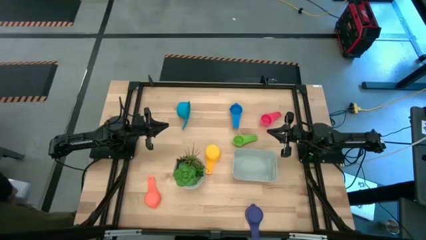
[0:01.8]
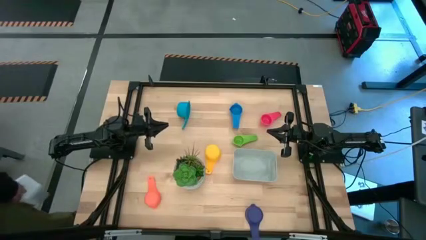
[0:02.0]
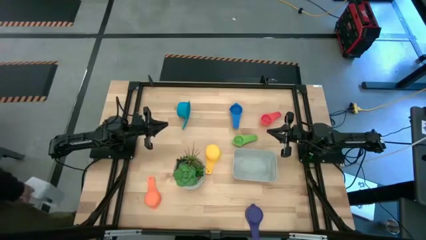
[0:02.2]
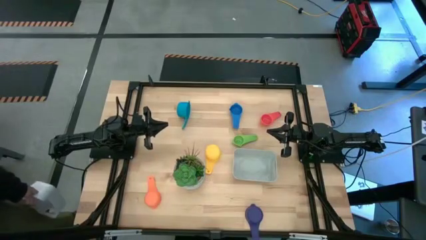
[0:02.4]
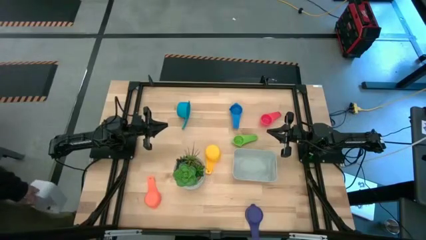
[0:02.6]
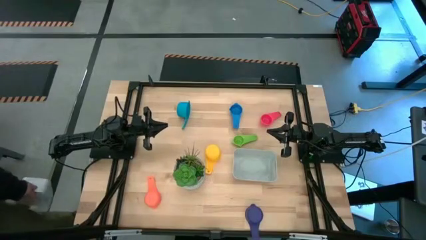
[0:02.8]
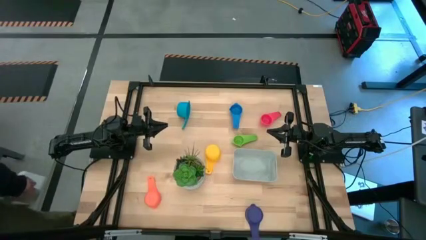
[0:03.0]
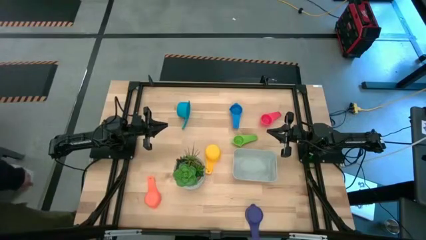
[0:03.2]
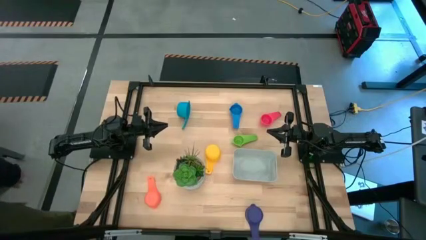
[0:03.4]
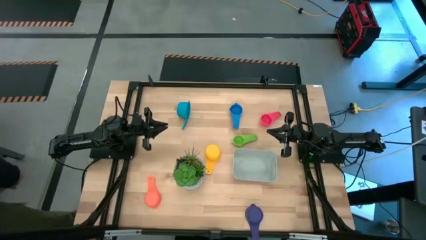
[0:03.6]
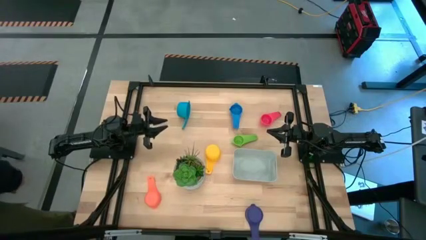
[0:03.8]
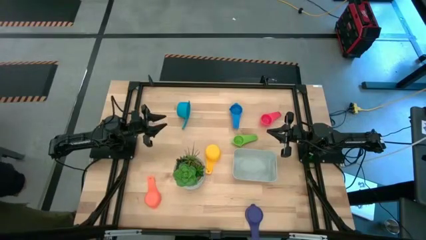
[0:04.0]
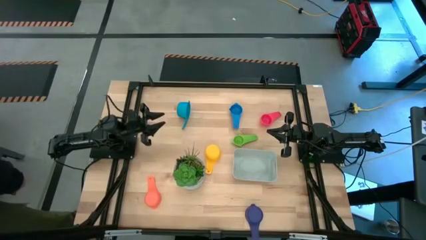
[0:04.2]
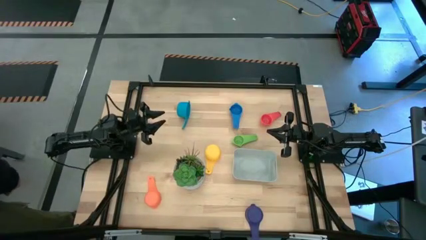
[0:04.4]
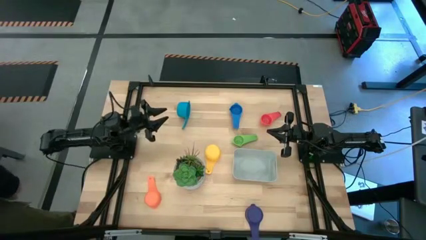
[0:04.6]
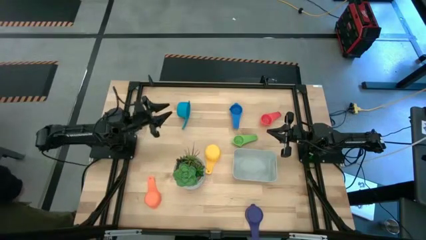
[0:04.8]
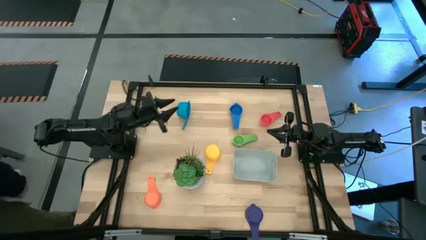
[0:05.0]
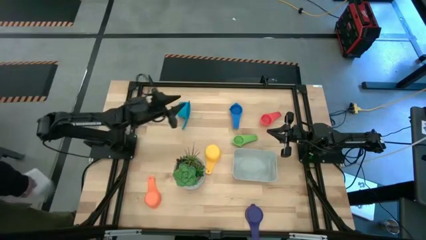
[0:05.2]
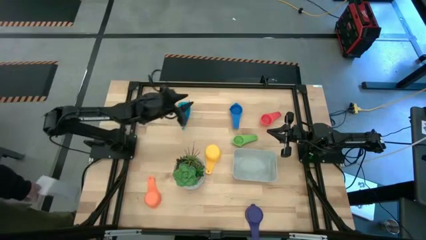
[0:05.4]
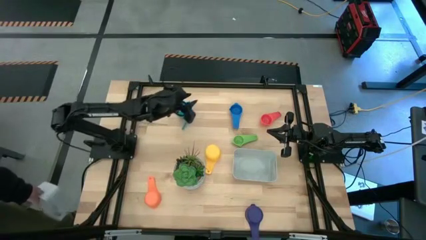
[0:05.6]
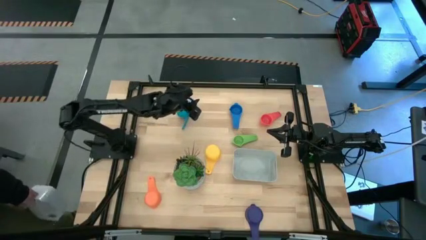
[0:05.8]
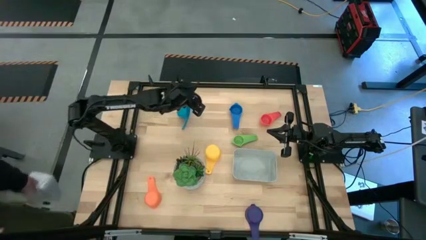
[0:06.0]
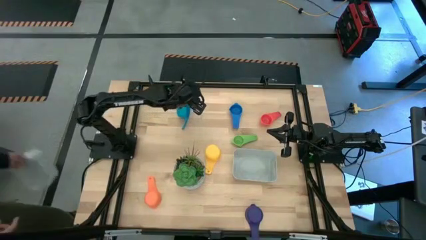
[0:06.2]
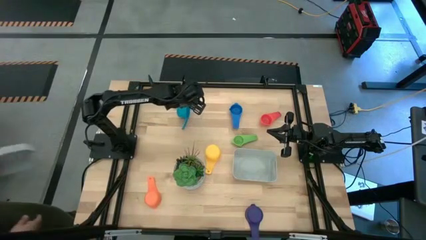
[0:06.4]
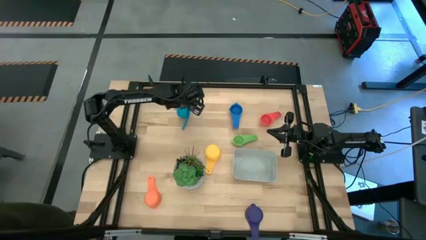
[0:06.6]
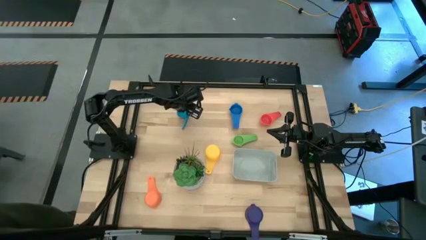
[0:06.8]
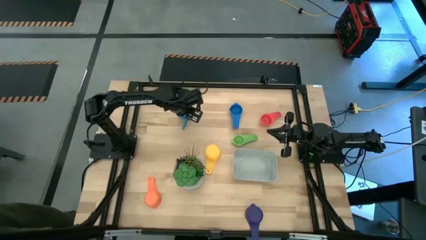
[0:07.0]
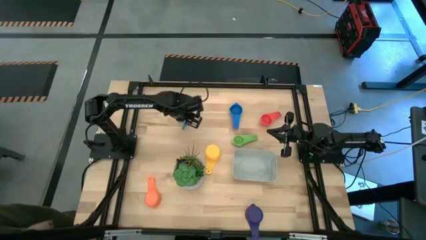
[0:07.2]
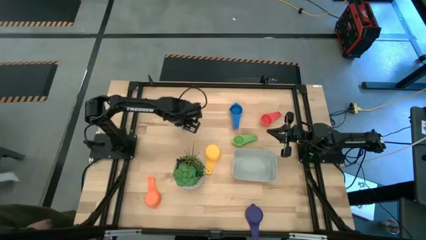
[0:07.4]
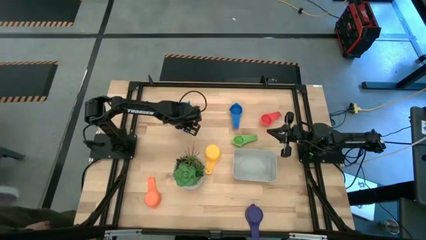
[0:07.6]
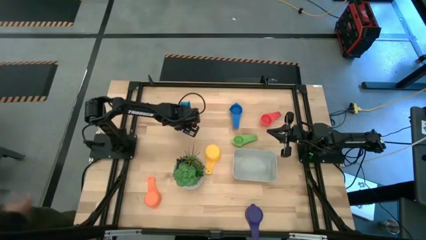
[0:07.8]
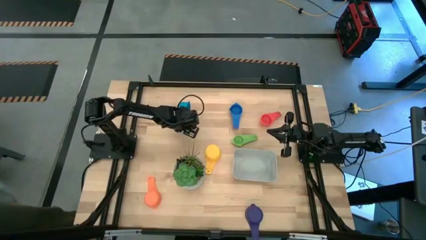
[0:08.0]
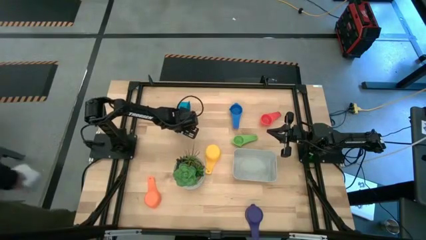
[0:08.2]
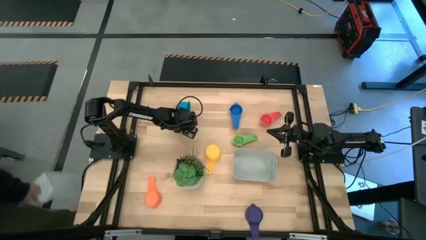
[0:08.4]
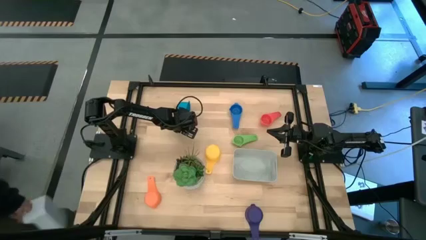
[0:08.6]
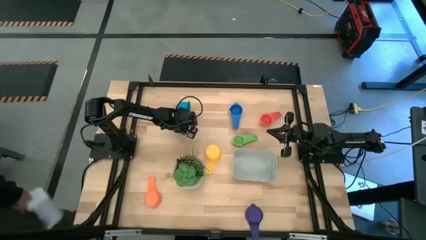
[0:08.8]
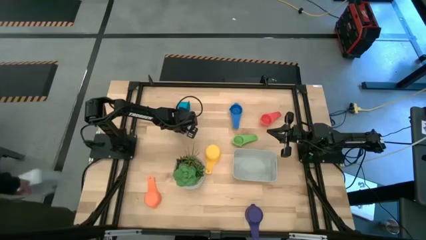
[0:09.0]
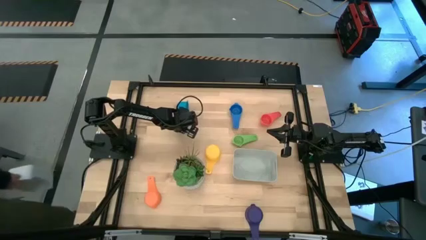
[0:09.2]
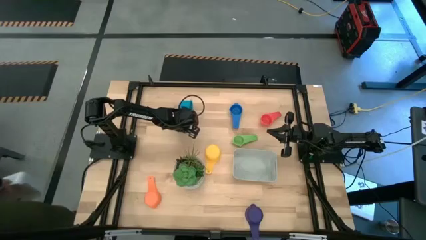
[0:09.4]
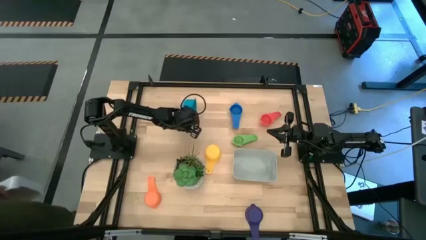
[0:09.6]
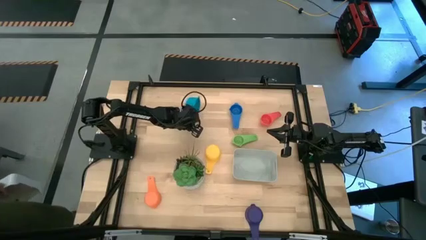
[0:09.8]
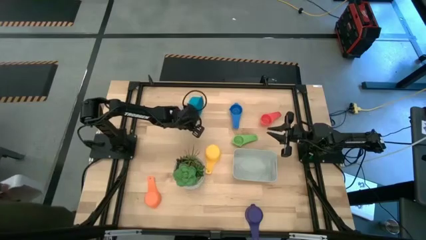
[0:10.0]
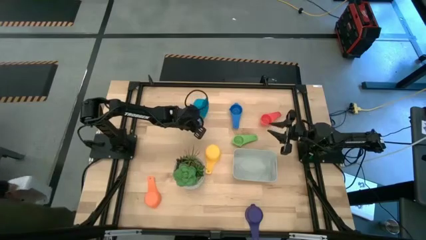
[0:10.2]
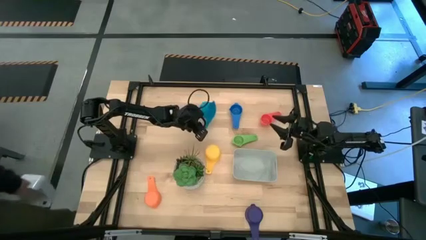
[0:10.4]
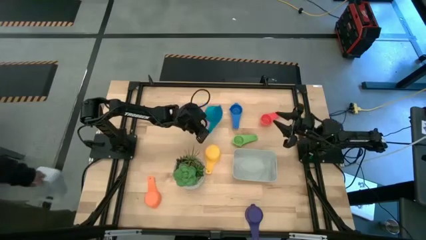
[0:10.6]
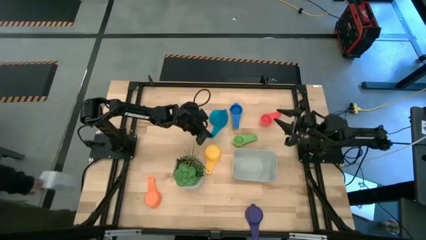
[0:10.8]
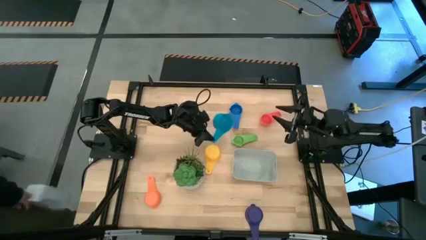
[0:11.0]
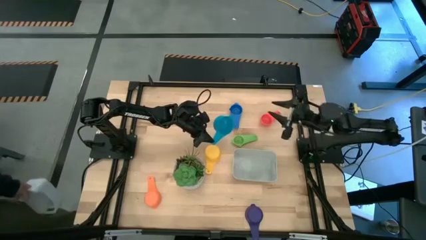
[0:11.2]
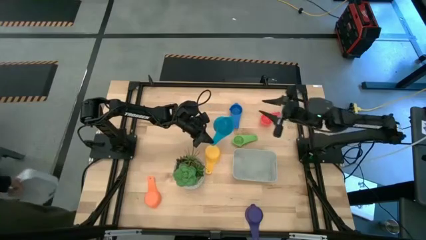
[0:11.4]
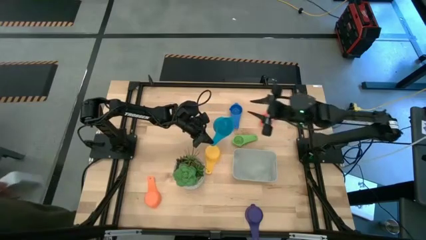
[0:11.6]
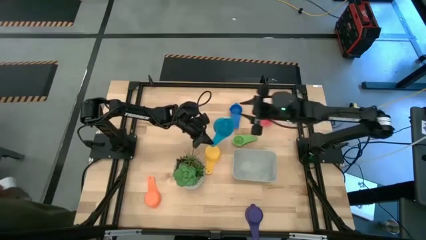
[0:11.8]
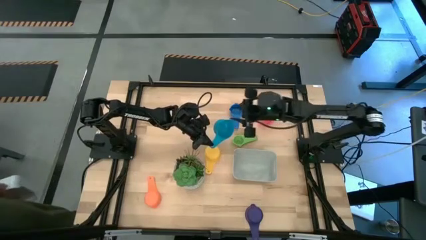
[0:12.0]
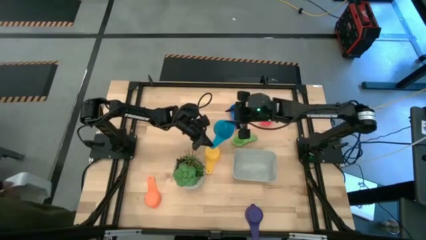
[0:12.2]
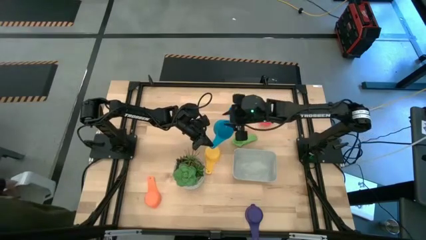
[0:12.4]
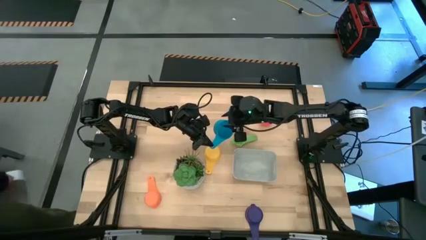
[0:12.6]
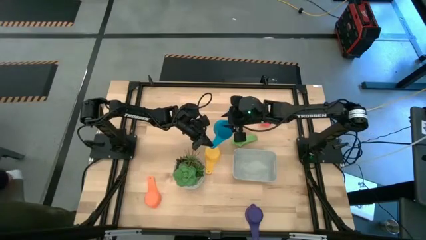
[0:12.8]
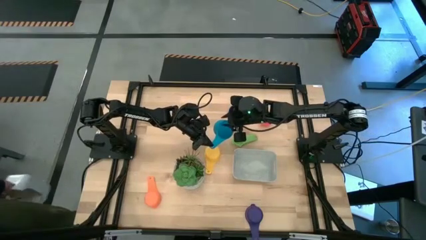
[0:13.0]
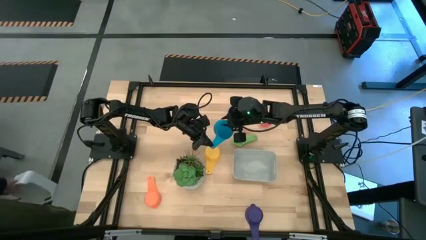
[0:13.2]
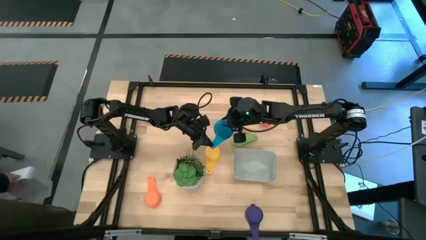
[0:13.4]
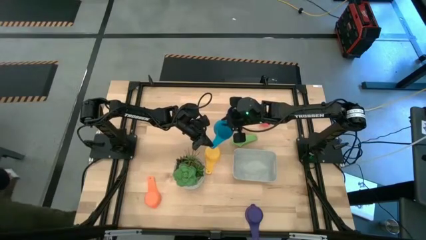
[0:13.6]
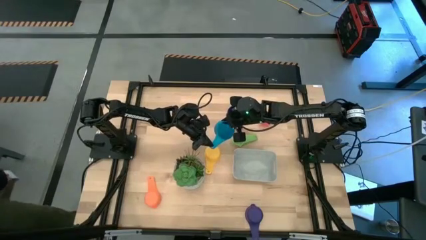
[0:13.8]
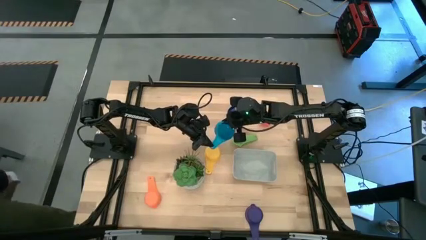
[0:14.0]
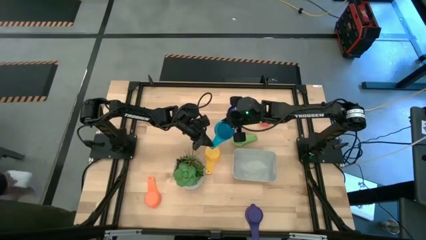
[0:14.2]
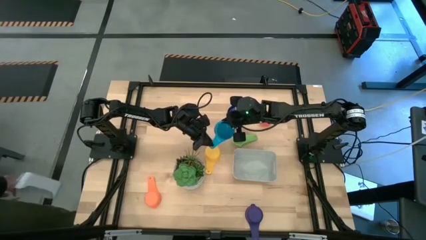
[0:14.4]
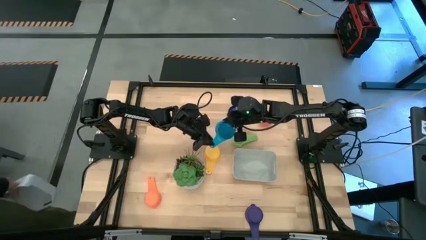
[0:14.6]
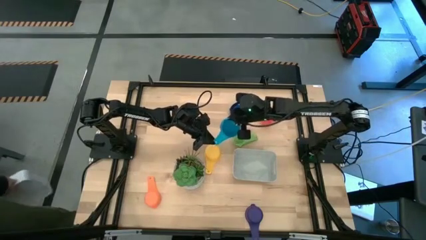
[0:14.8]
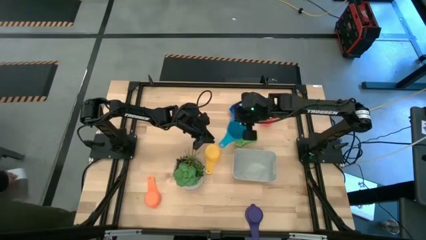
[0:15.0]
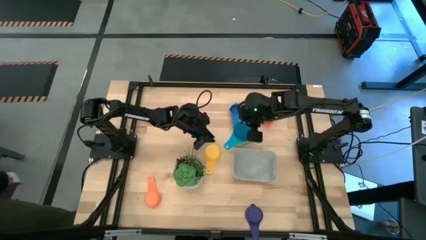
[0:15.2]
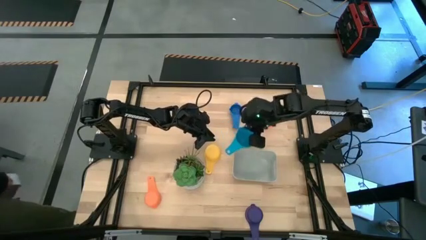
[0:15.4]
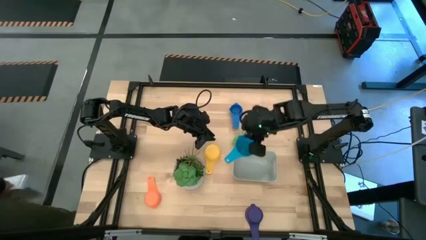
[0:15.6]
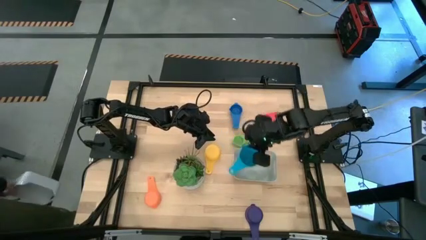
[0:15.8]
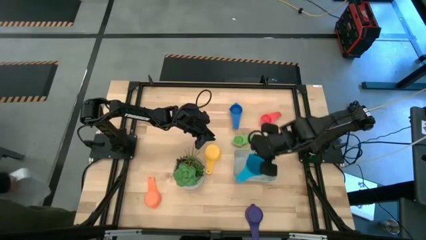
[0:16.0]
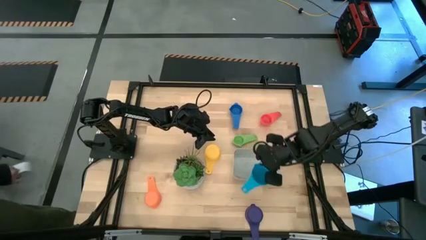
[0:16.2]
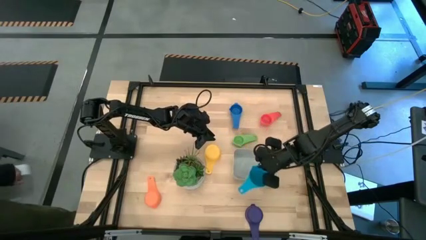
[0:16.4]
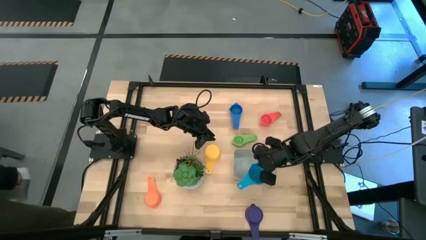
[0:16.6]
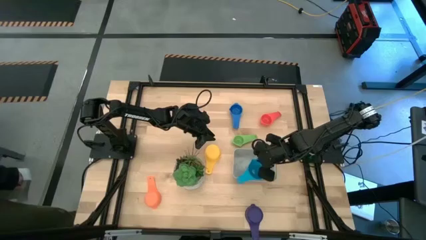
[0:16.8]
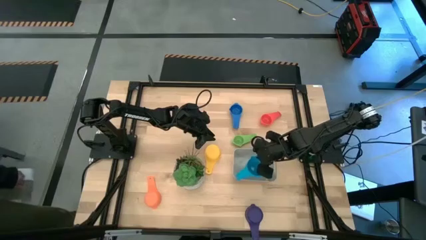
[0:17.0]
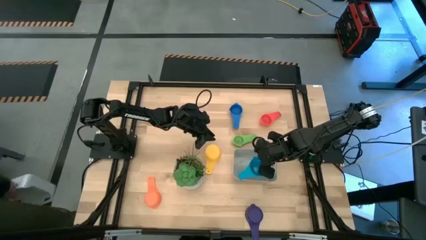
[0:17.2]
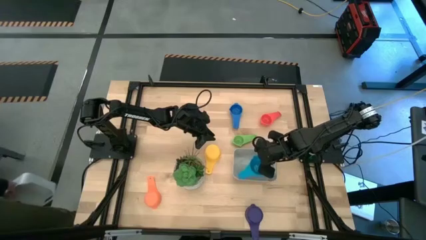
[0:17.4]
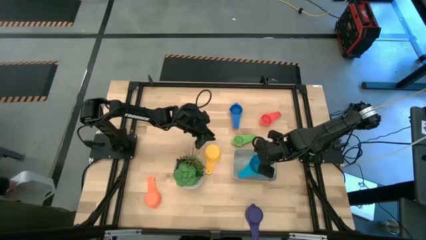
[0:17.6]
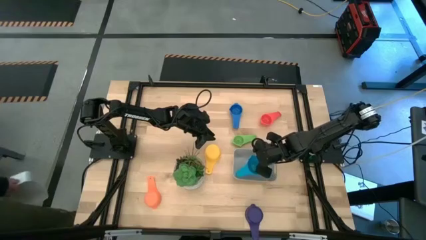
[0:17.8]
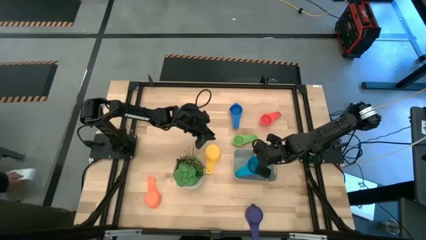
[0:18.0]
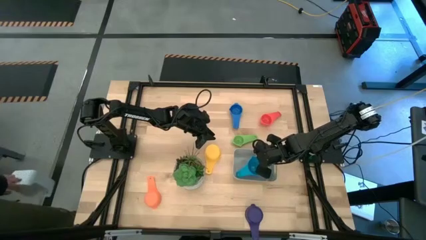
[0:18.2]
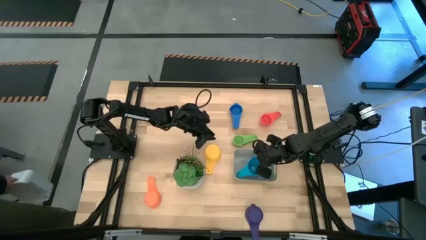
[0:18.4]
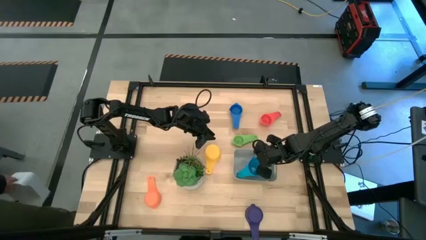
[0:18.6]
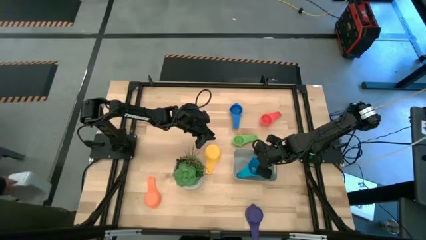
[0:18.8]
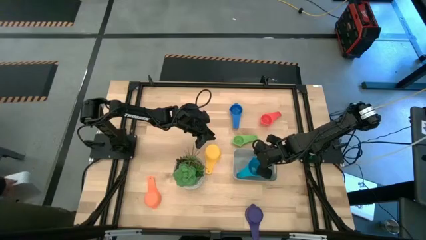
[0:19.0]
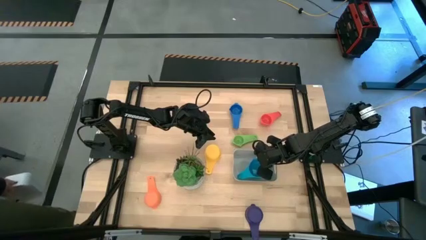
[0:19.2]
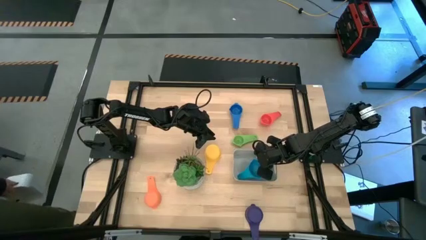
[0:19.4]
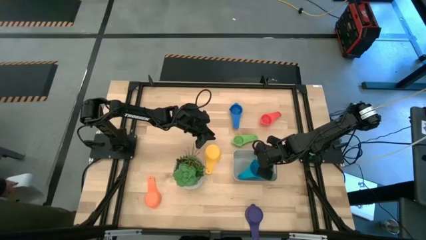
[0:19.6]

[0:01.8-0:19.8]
Task: Nest measuring cups in basket
Put the light blue measuring cup into the grey bin
